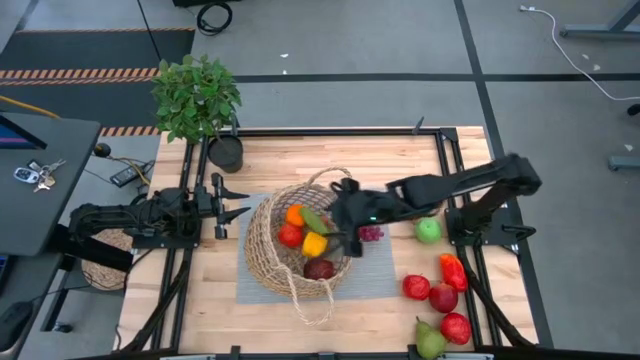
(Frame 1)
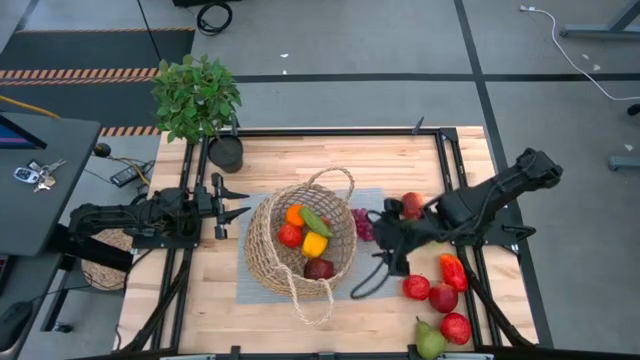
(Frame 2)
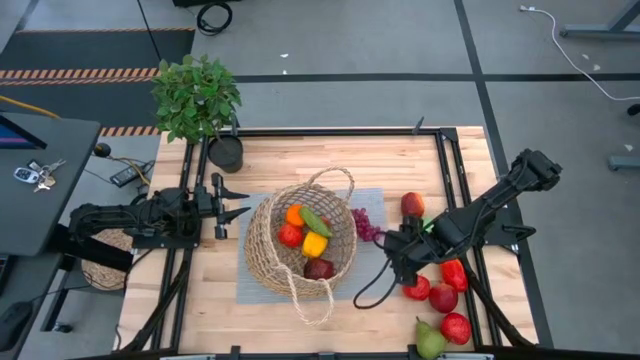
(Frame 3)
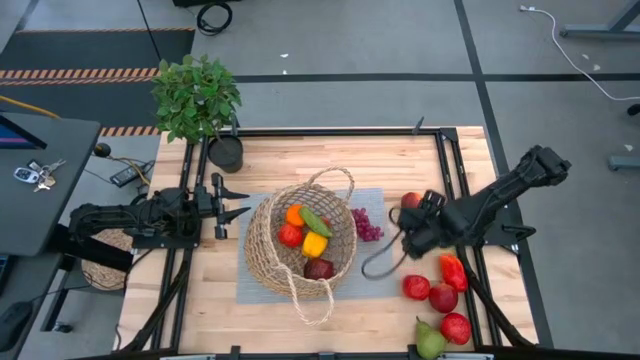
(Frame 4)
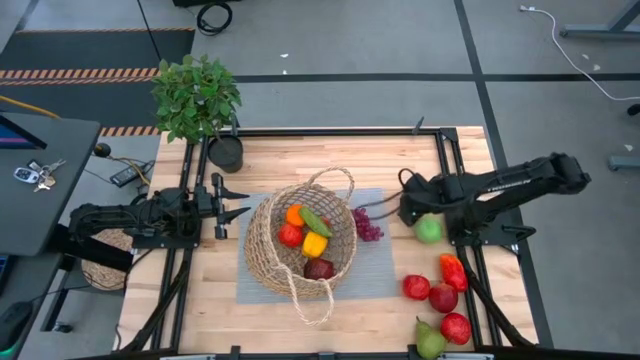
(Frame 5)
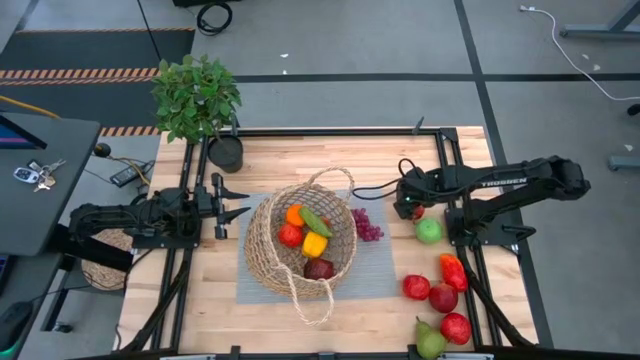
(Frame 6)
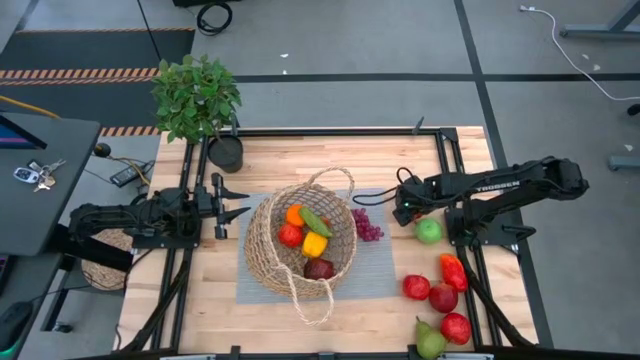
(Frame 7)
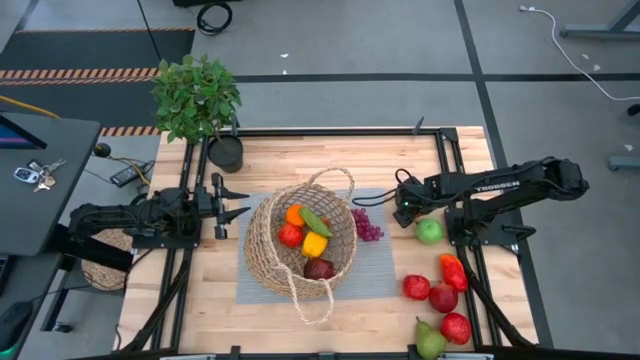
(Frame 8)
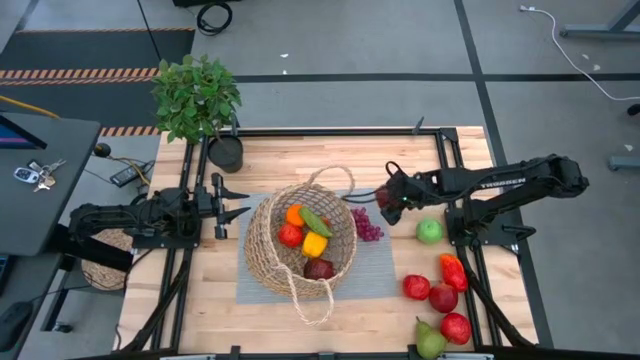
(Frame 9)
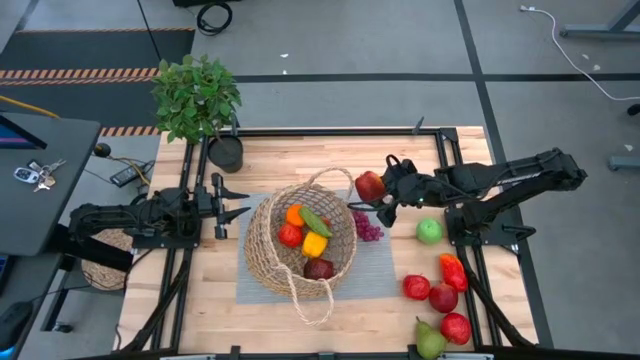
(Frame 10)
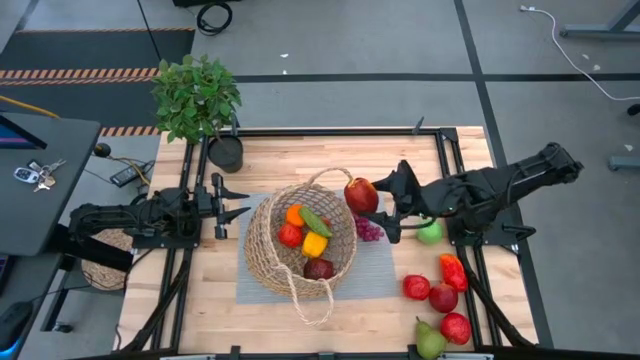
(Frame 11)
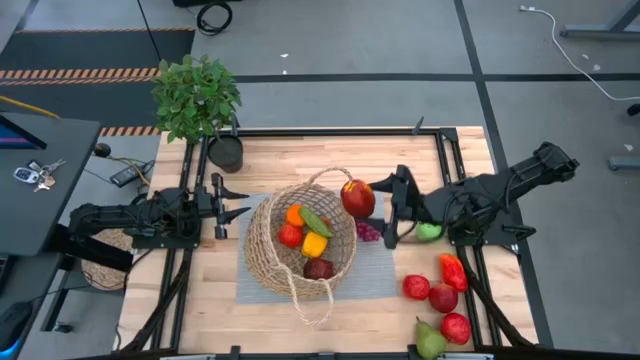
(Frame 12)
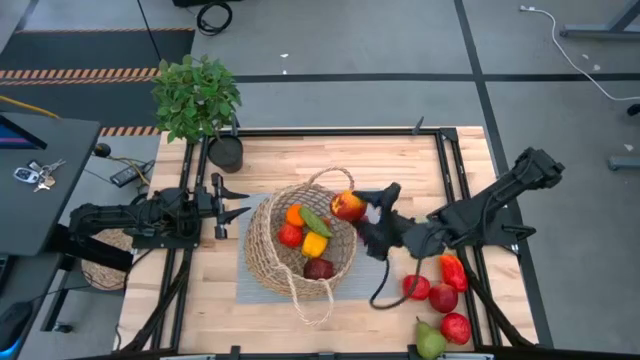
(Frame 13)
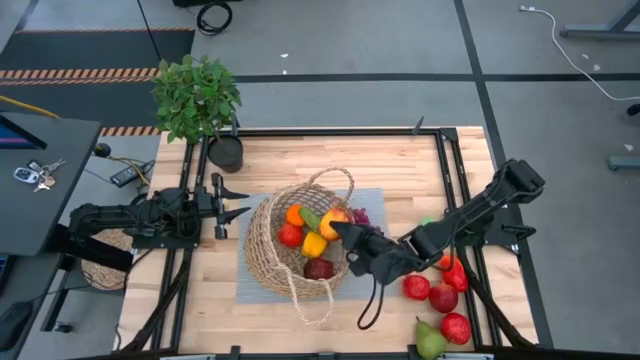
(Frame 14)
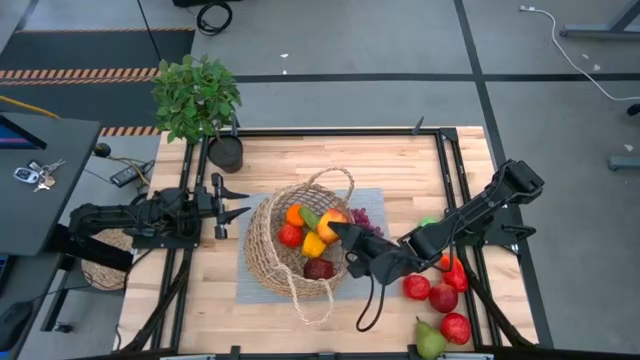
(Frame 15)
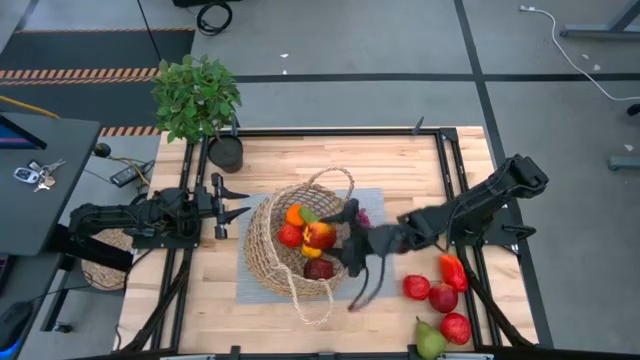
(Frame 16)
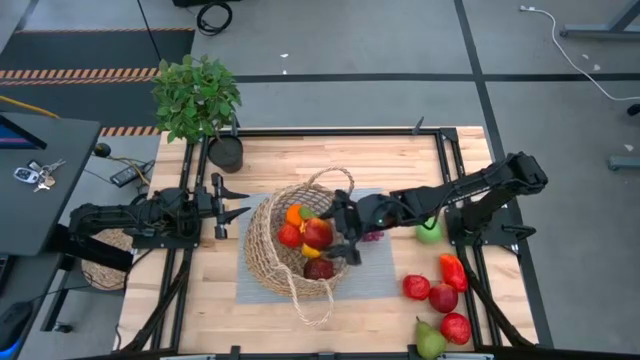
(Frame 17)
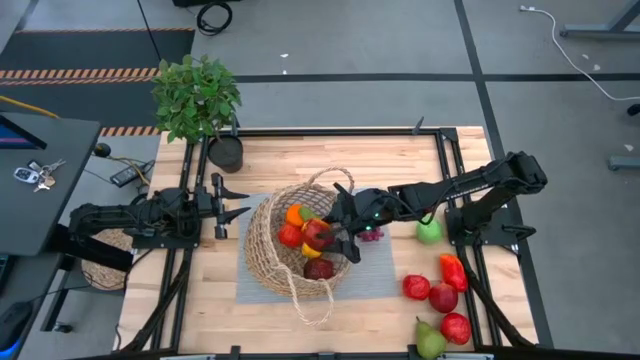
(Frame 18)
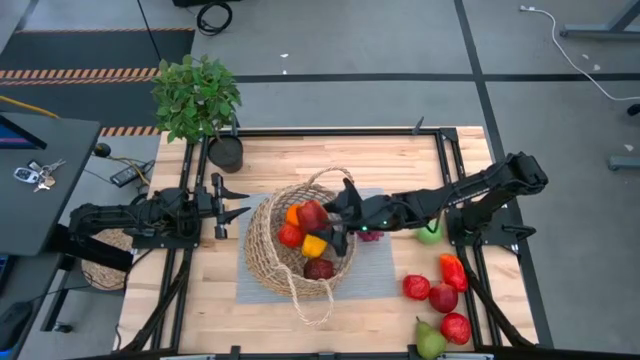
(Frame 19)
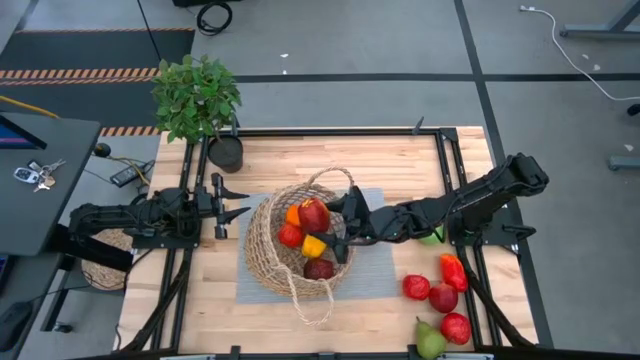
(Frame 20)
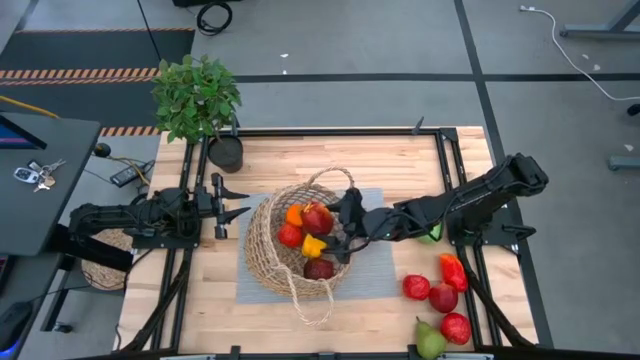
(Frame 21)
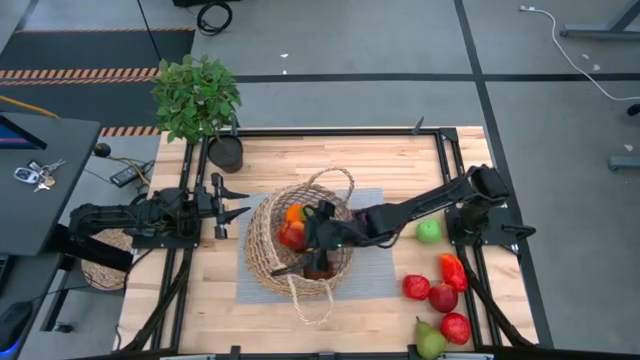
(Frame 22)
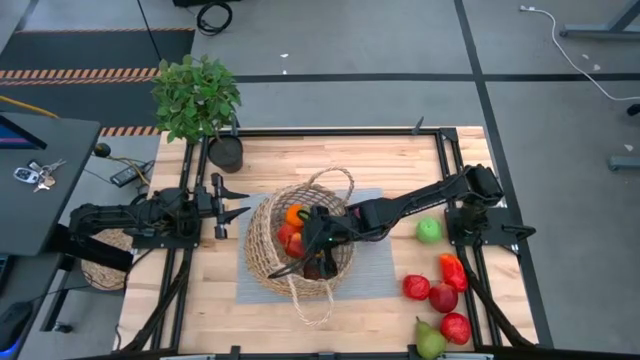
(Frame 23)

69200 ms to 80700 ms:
Task: Build produce basket
Put the top red apple in the basket

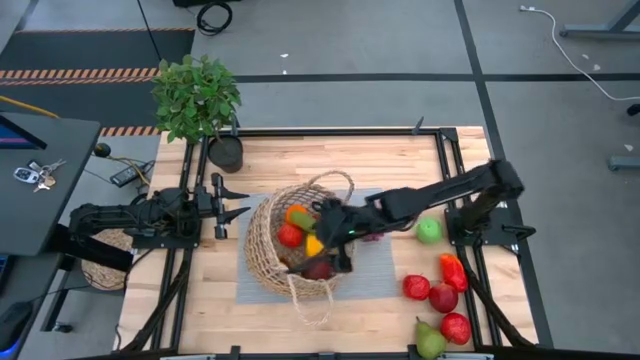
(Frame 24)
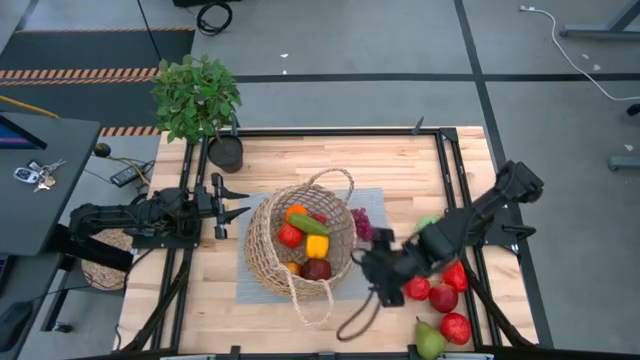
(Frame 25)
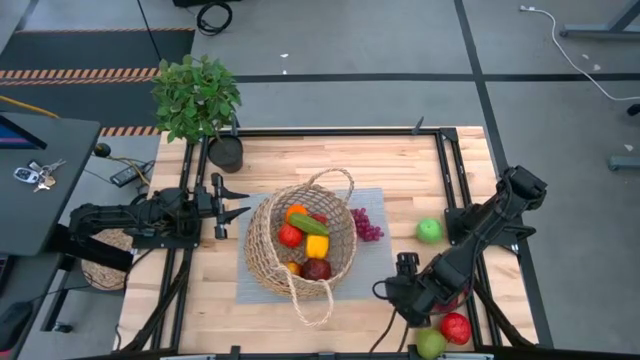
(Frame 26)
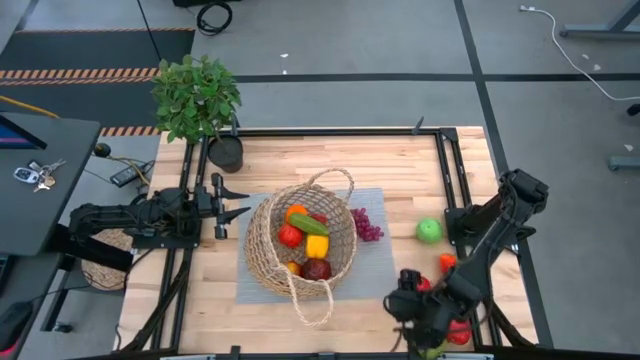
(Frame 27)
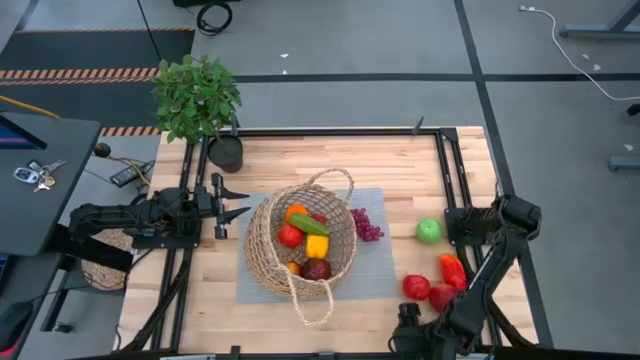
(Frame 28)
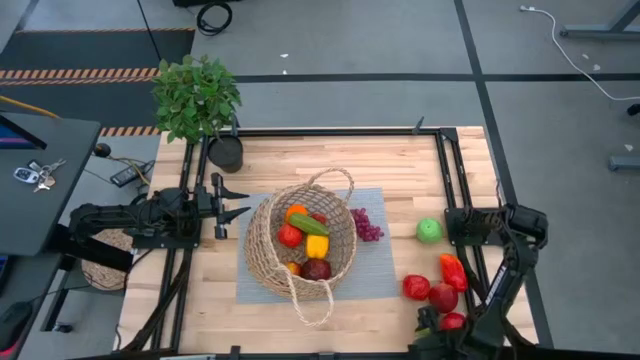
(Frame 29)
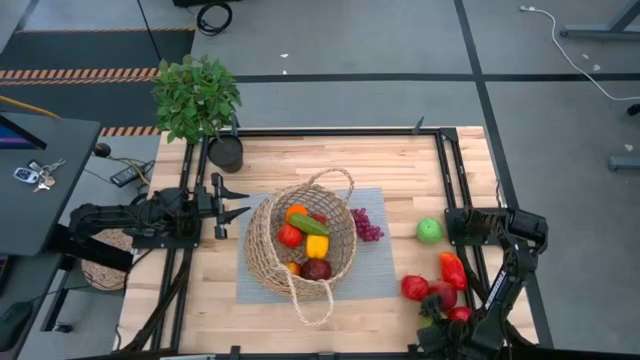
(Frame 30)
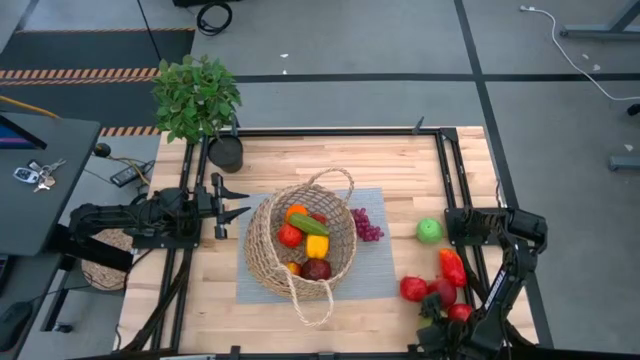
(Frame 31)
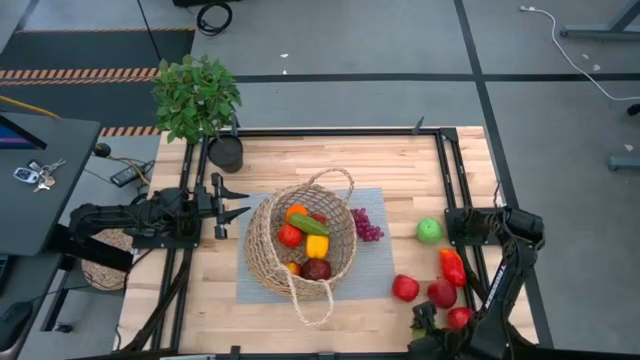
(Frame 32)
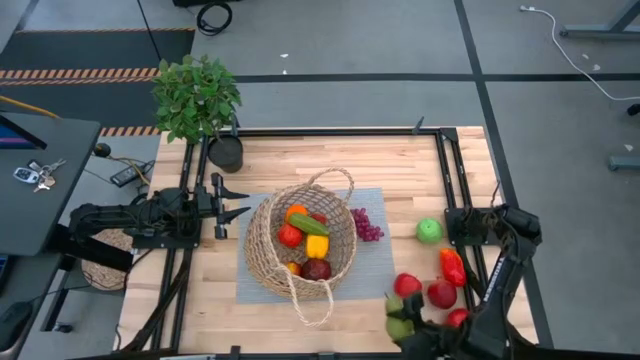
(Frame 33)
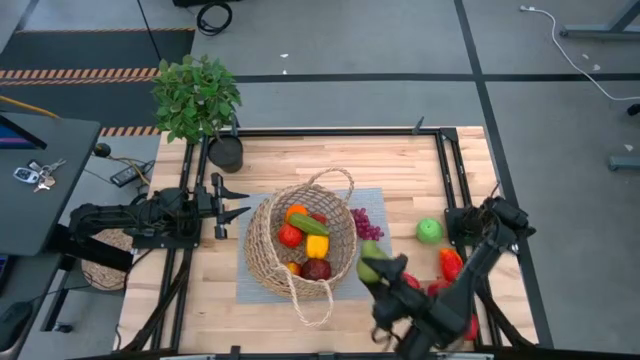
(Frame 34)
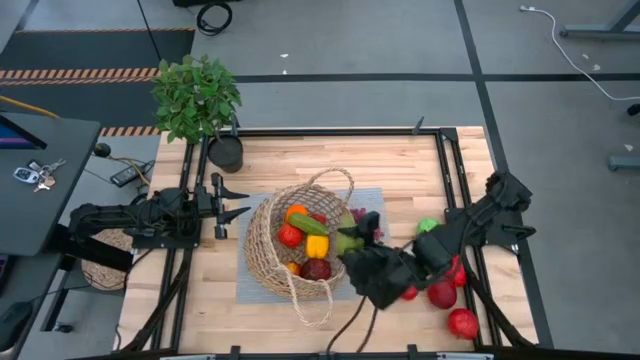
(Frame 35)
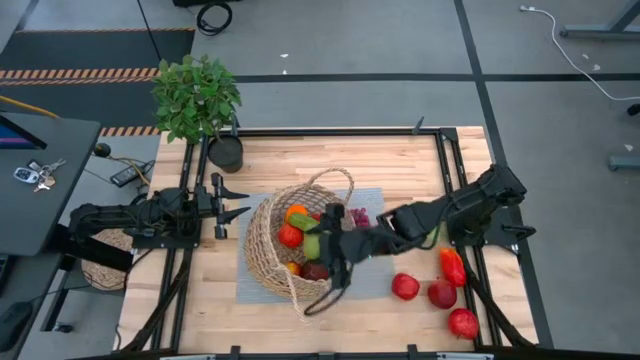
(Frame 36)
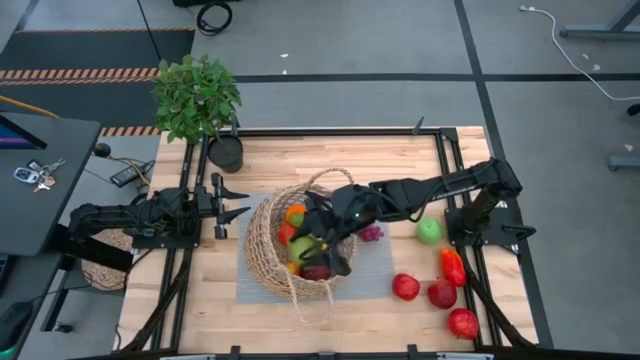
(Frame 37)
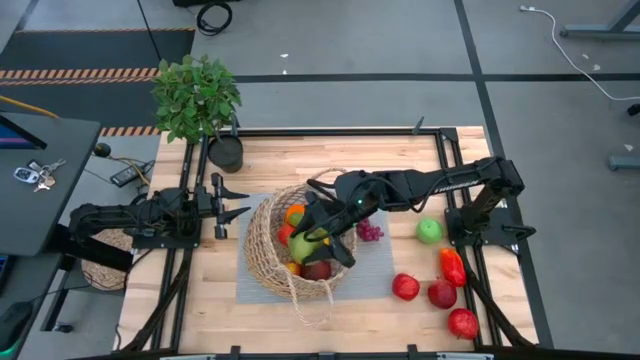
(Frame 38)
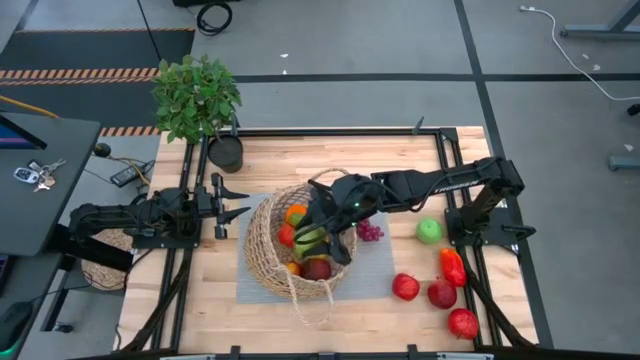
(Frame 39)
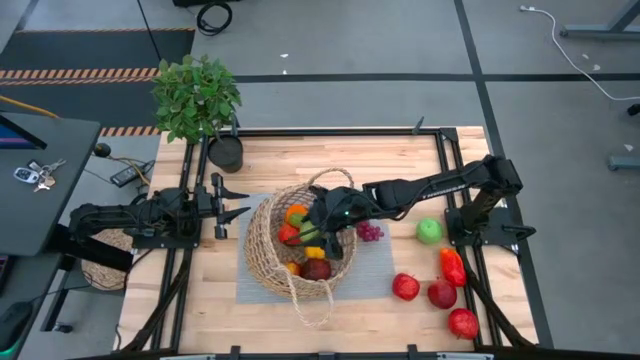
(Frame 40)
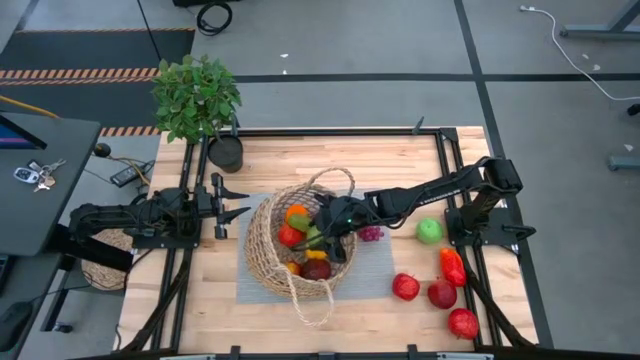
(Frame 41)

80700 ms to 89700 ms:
Put the pear in the basket

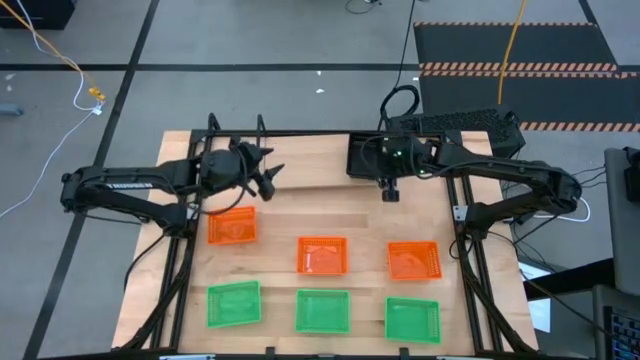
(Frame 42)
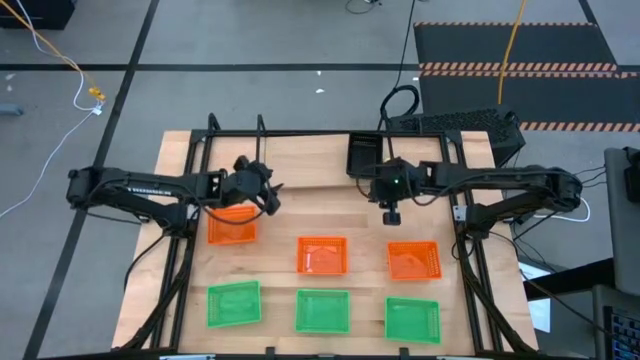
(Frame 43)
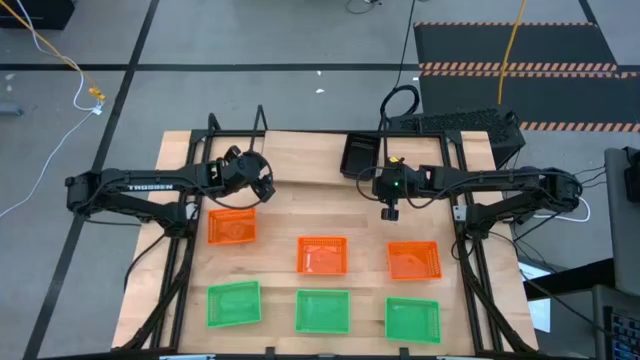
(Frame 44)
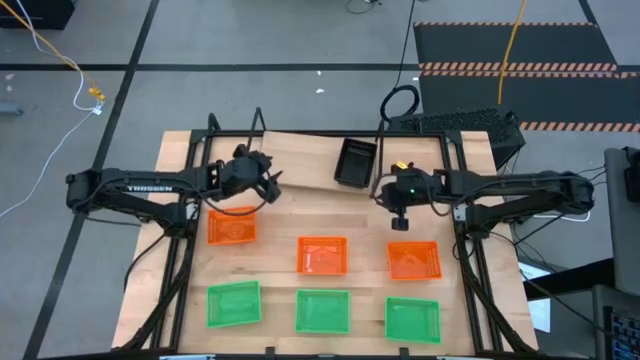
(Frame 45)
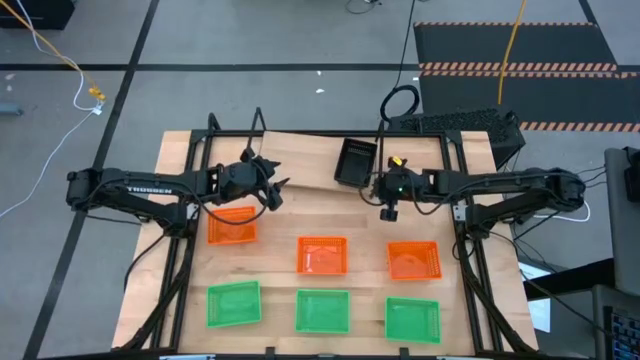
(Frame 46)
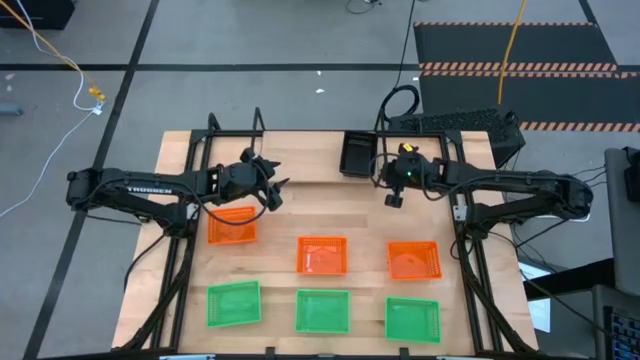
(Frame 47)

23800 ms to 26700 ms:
Task: Stack baskets on shelf by color
Adjust the shelf
